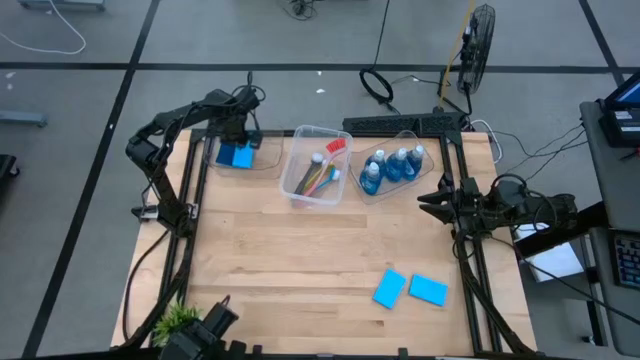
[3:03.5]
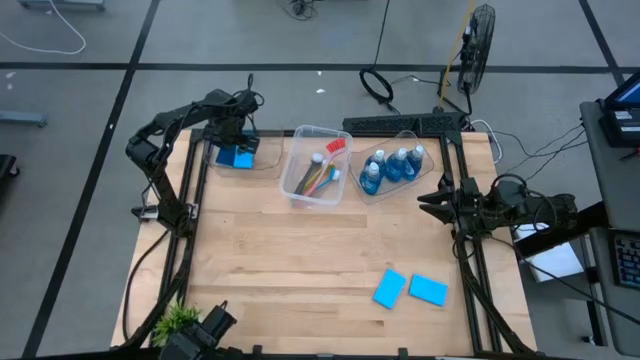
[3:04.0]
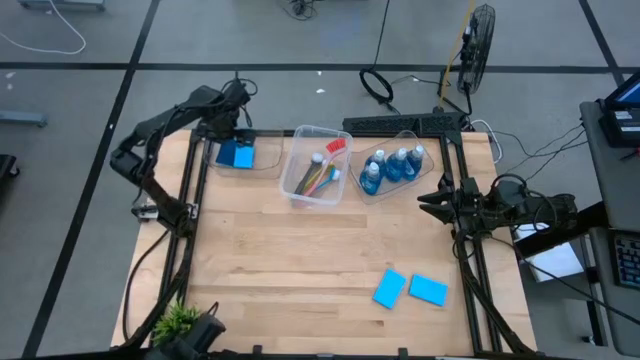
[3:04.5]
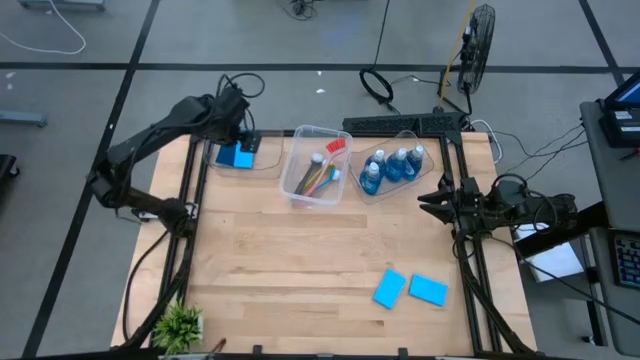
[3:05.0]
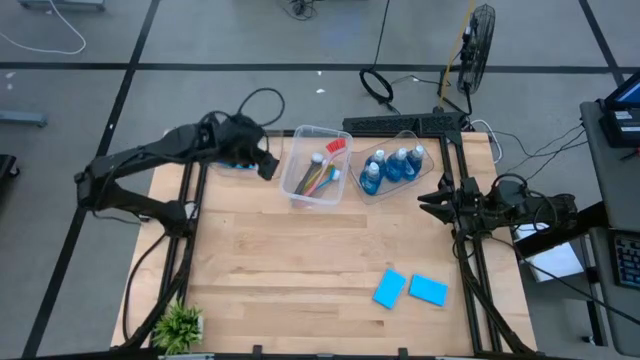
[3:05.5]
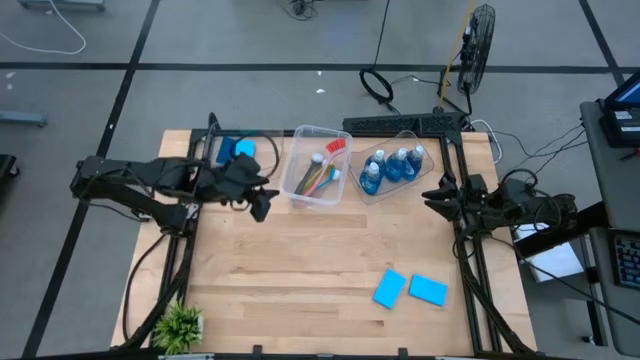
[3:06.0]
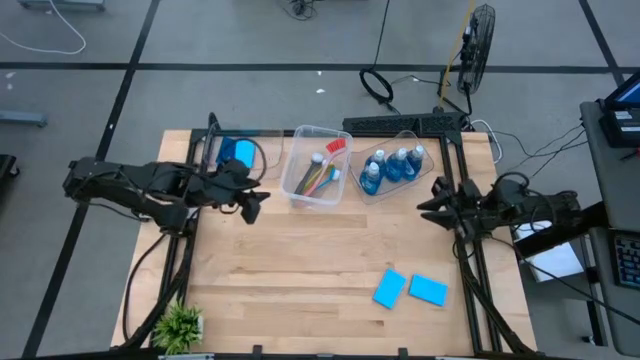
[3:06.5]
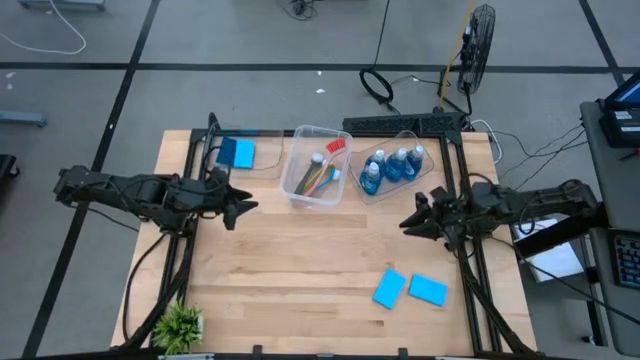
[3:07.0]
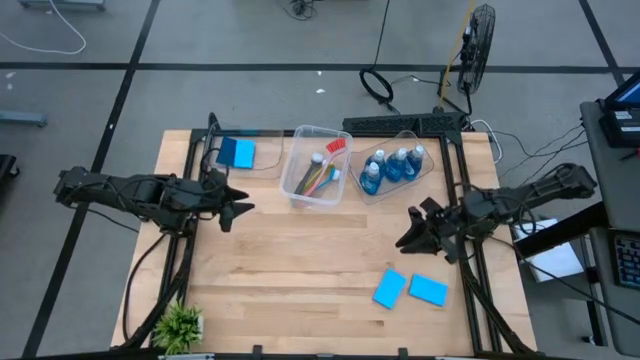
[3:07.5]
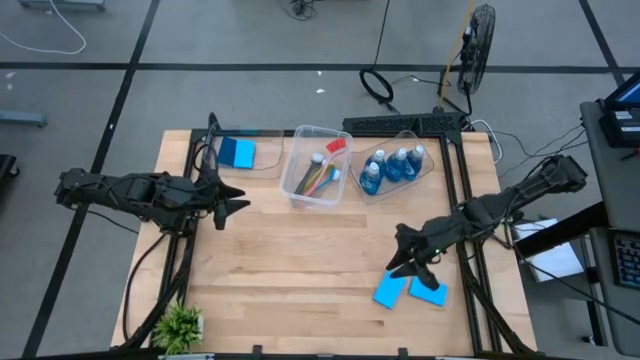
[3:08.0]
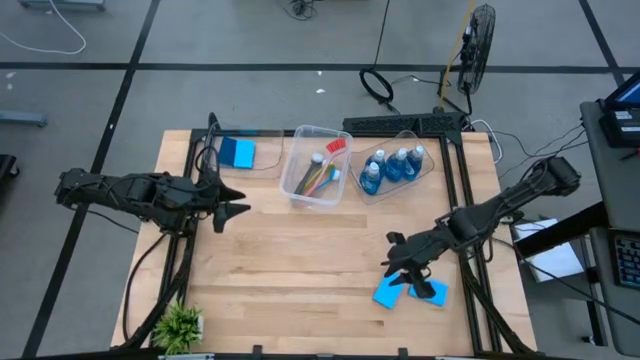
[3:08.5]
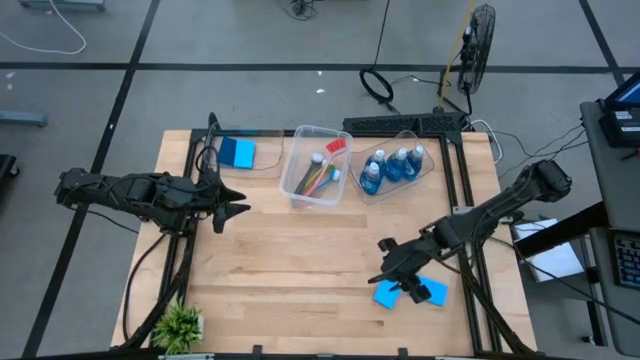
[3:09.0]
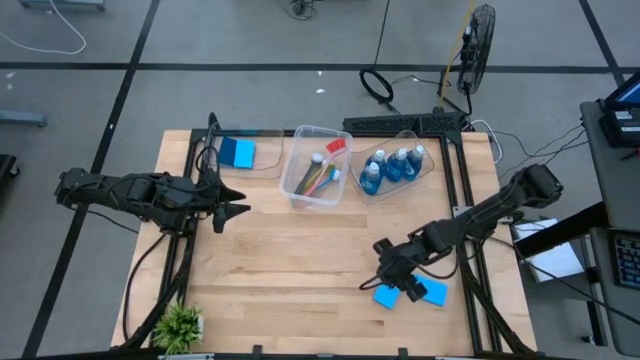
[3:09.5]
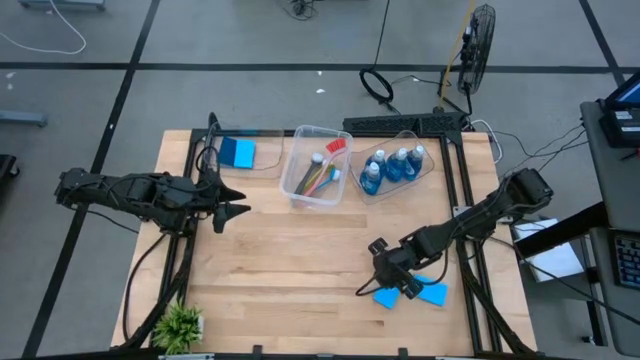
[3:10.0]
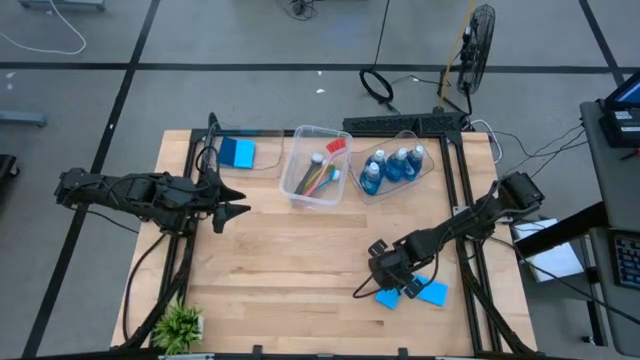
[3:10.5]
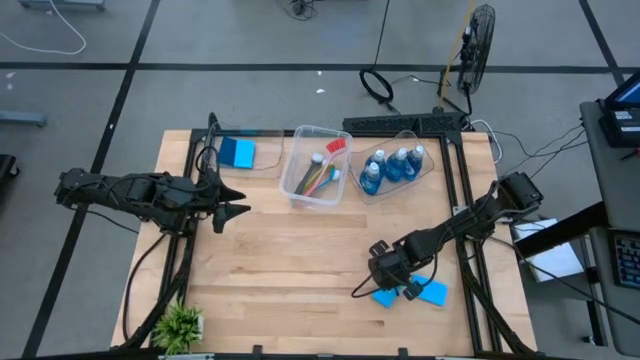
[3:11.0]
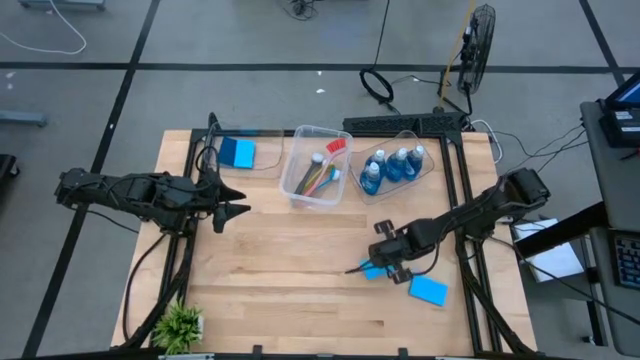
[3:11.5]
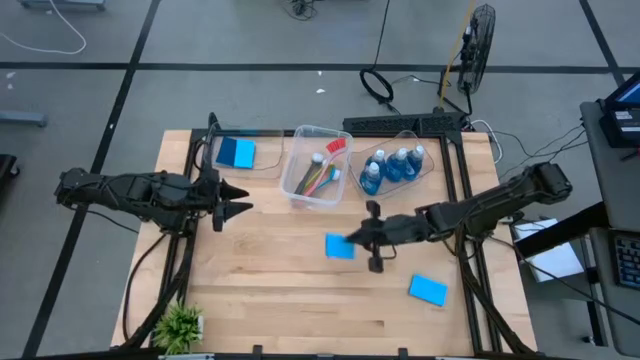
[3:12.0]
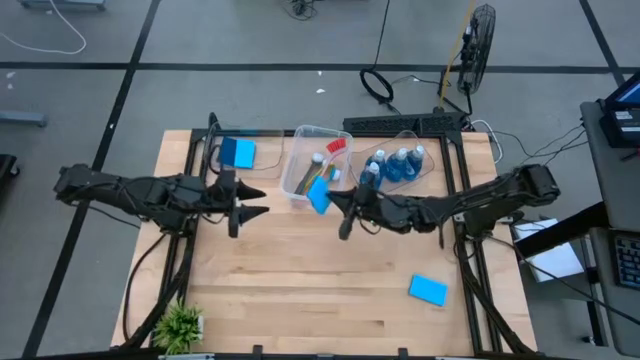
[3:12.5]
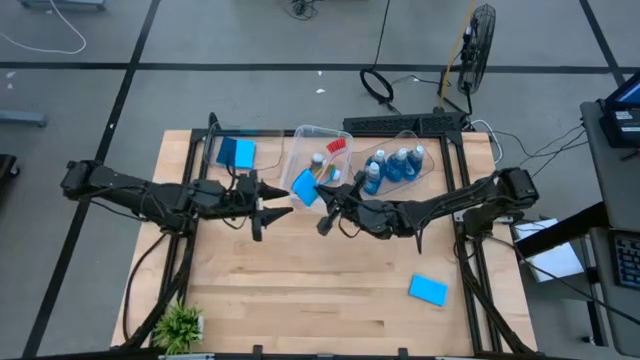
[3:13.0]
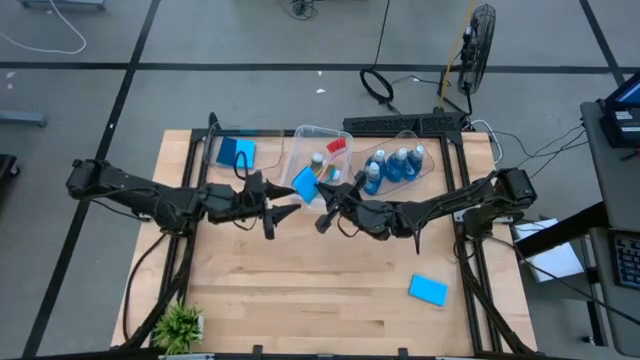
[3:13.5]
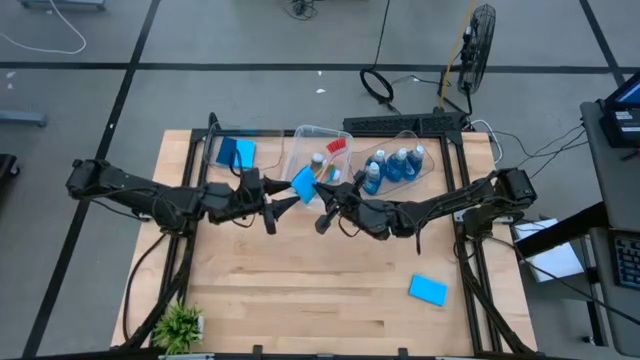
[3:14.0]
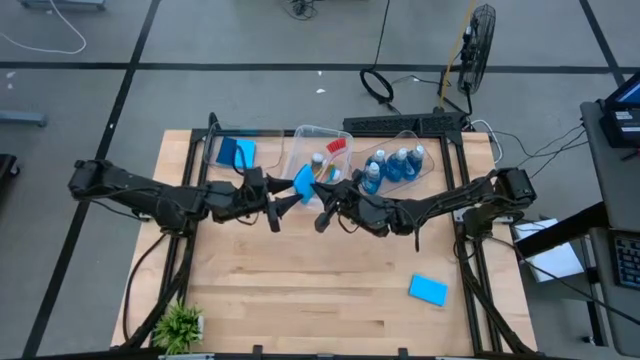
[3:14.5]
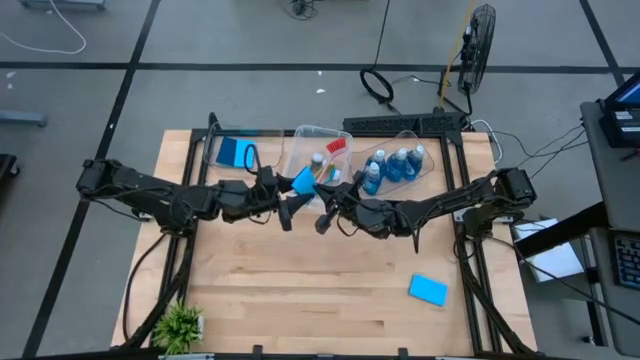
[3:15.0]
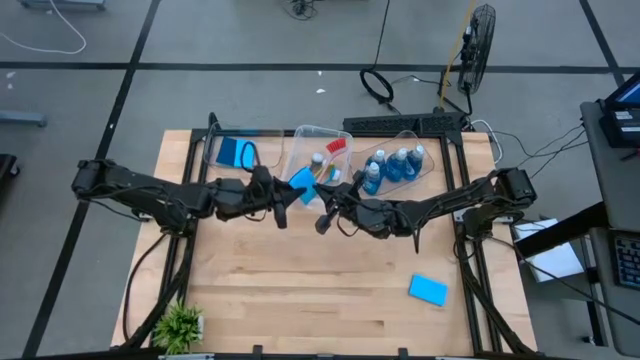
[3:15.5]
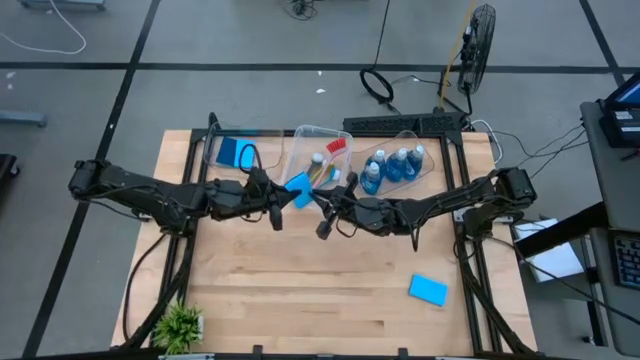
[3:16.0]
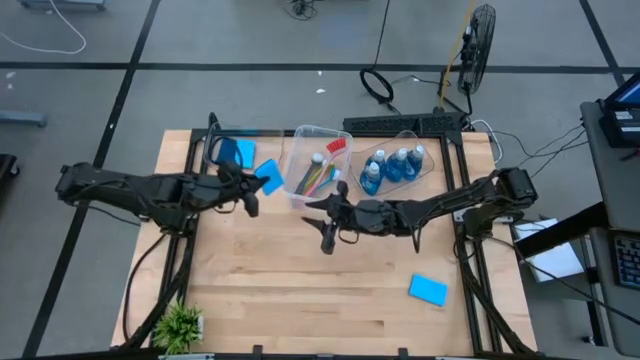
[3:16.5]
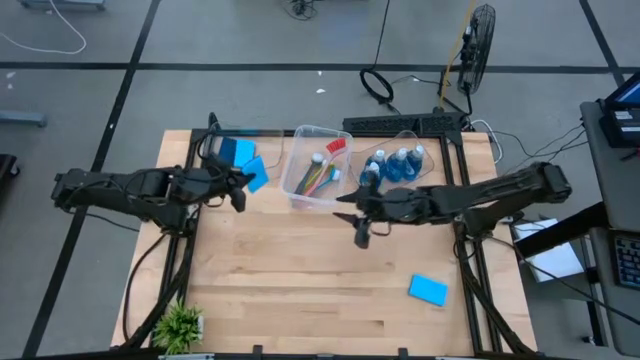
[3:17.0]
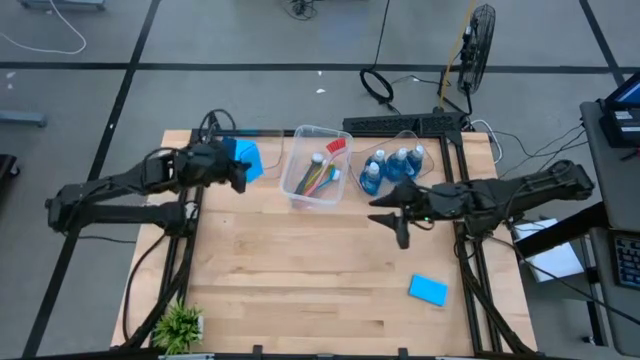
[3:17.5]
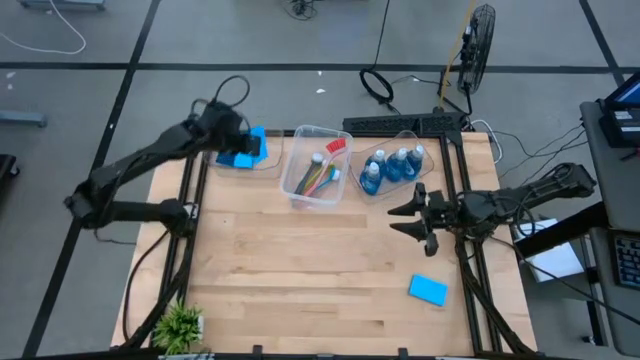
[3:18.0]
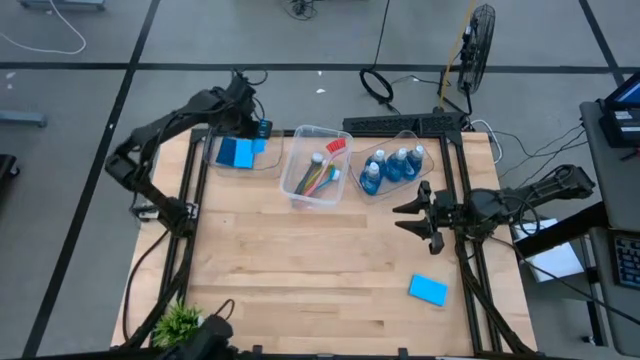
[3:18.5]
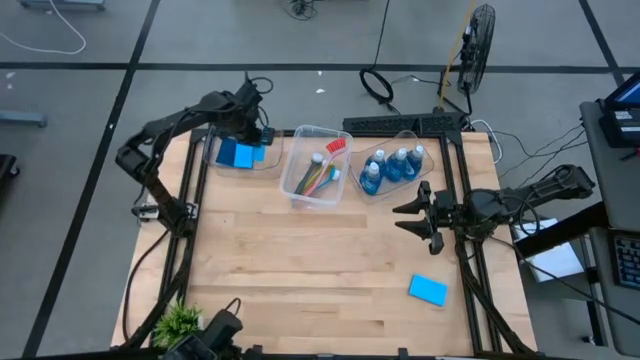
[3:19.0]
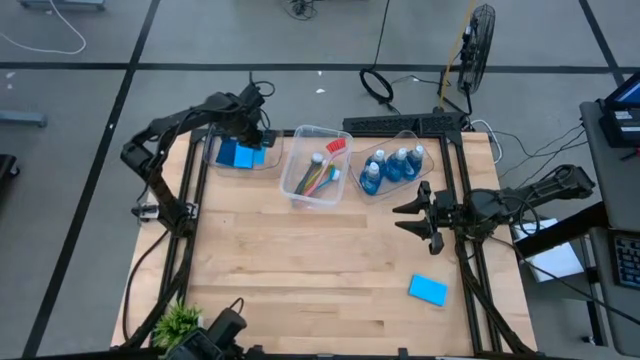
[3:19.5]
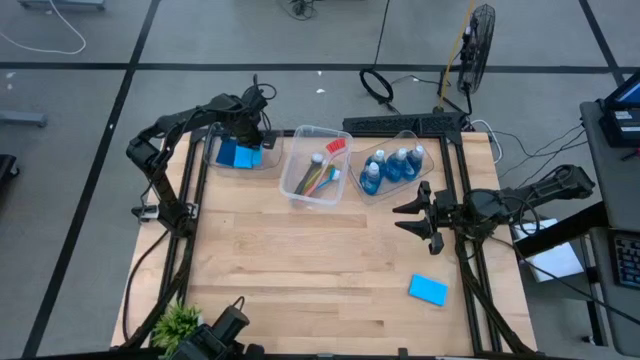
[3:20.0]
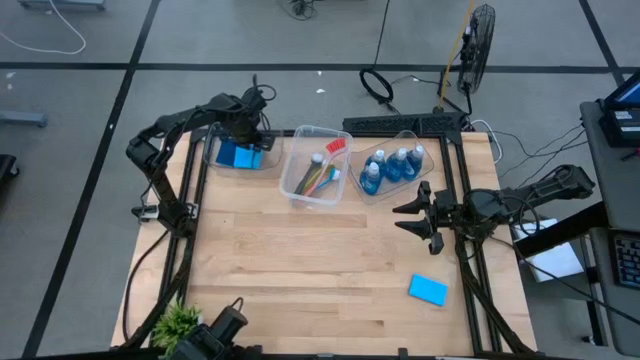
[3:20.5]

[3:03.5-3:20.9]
Task: Pick & Place Kitchen Sink Supplies
Put the blue sponge into the left transparent bin

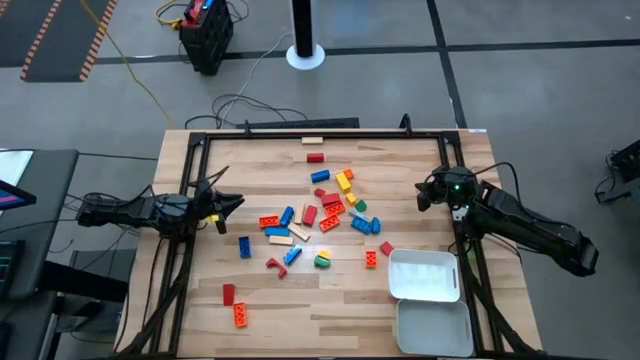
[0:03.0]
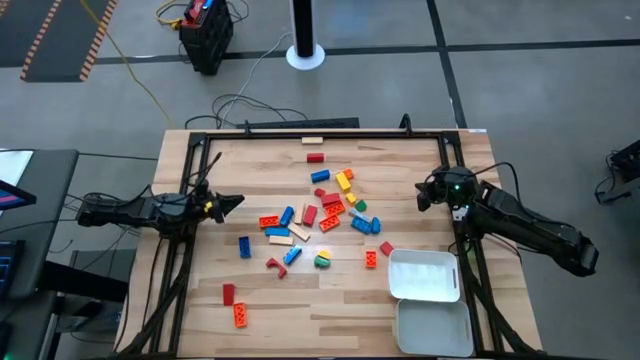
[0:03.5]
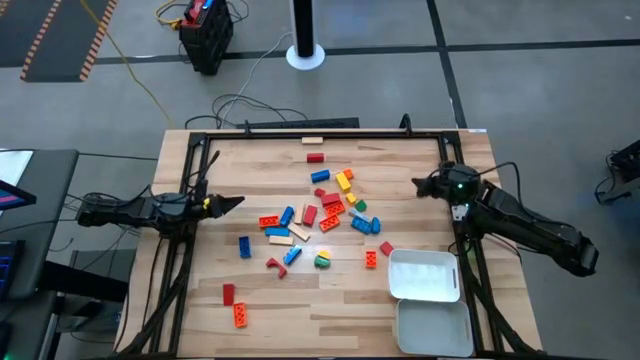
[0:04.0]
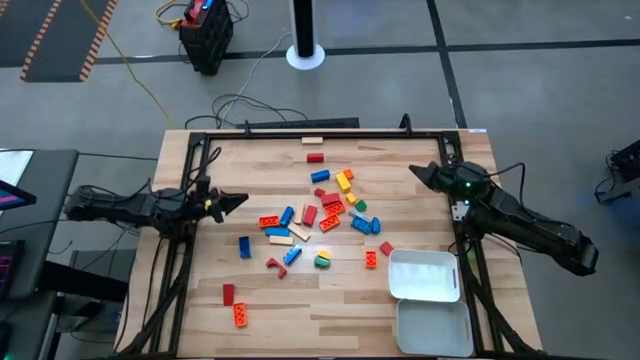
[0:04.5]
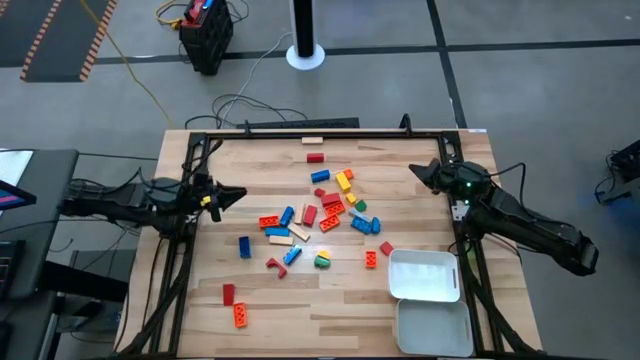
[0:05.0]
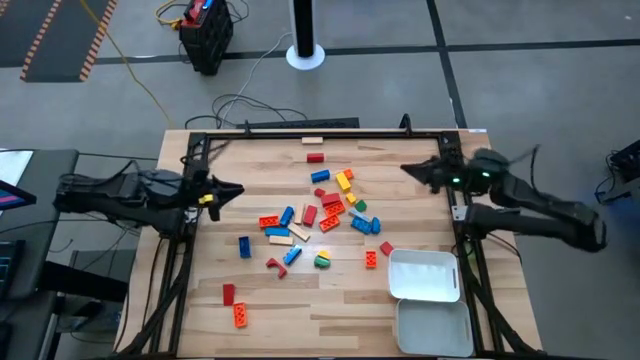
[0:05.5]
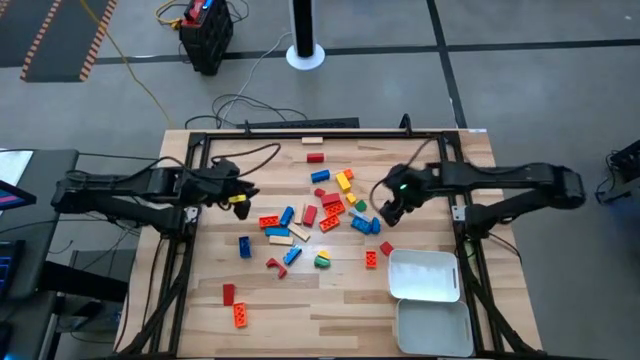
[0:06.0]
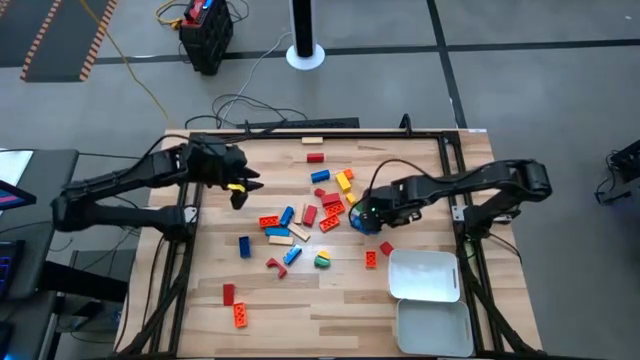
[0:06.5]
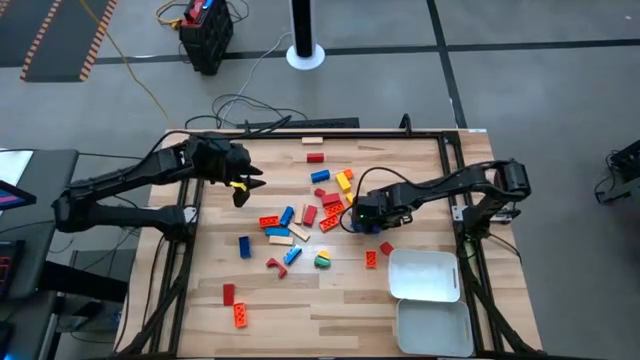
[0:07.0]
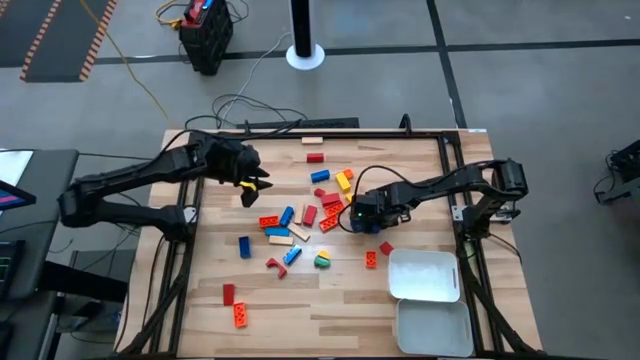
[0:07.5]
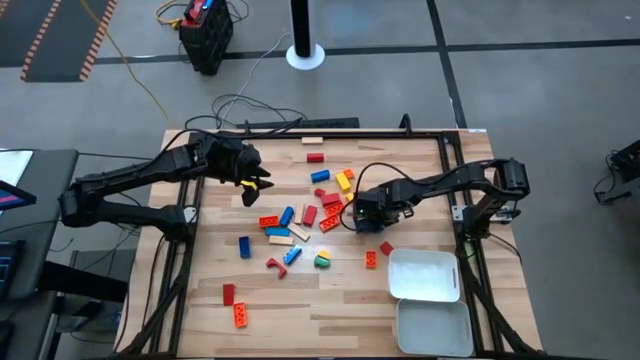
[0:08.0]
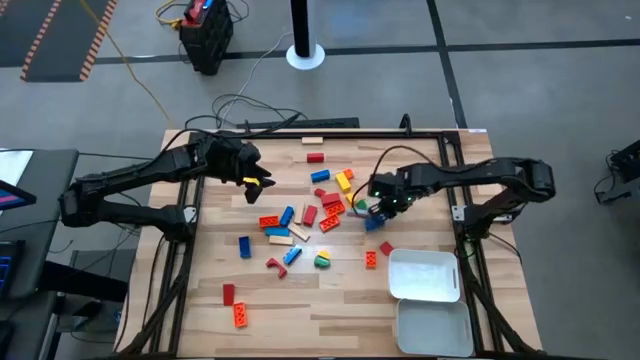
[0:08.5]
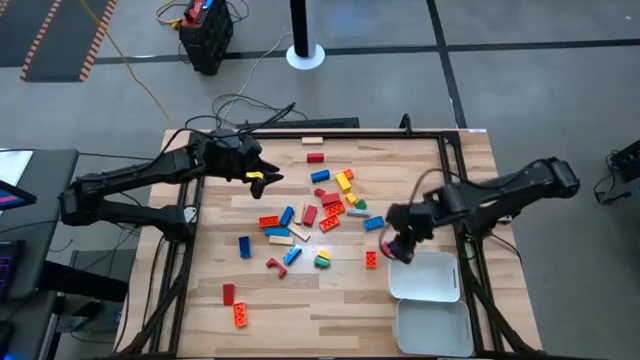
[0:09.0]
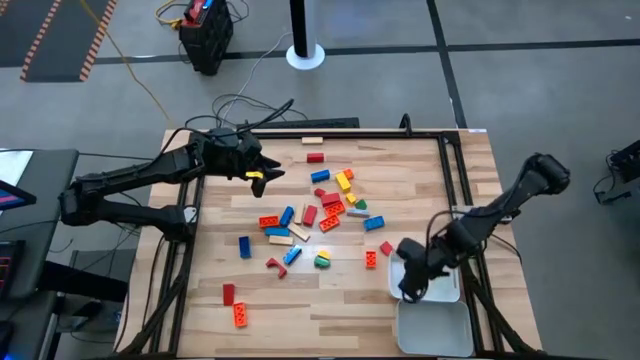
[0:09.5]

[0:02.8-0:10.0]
Task: Sort blocks by size
Put the small blue game piece into the white bin
